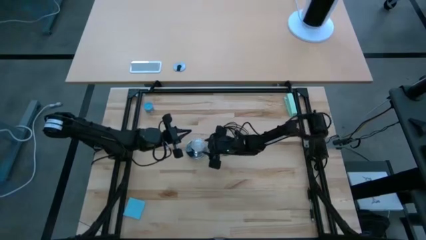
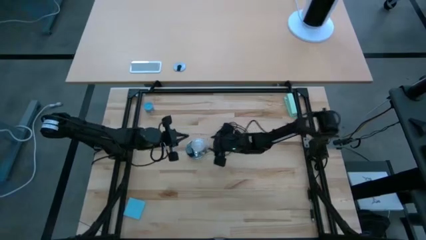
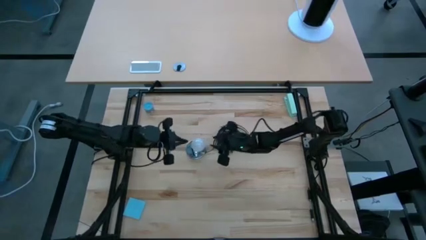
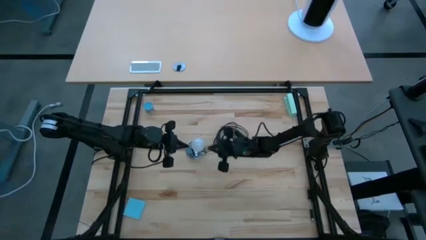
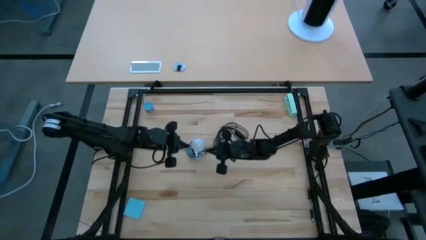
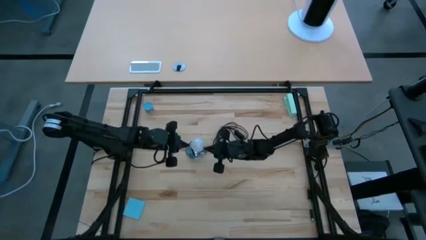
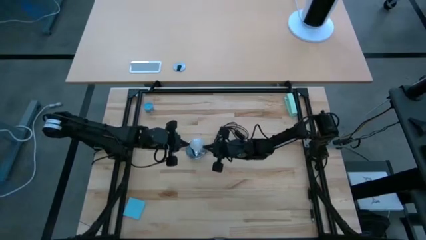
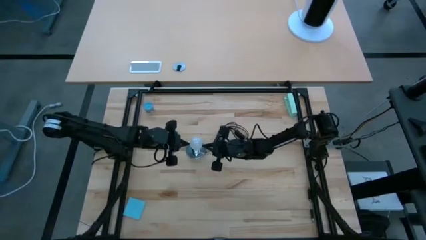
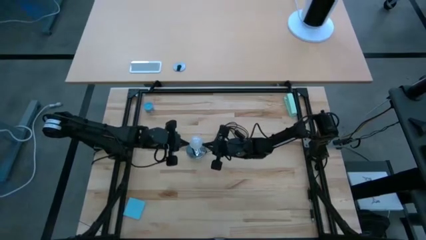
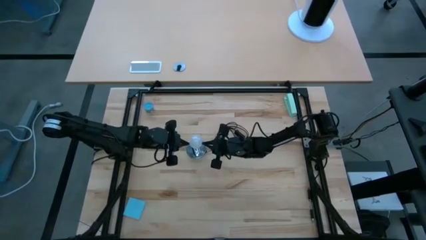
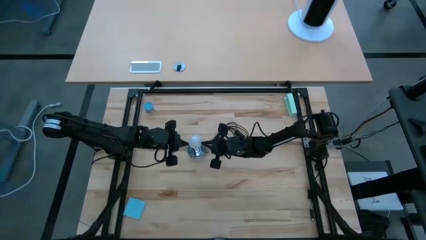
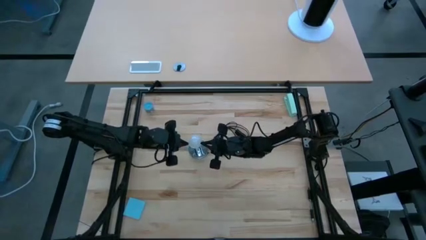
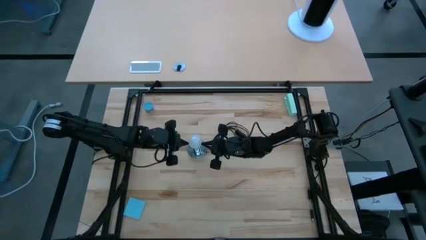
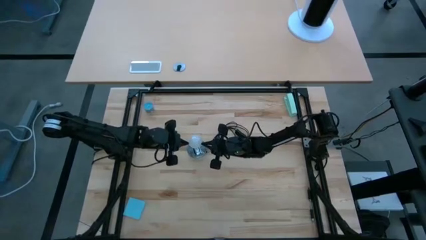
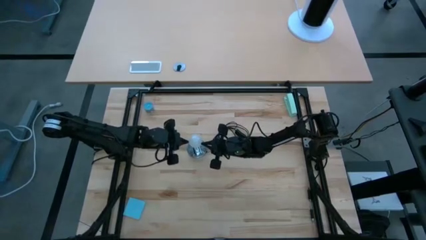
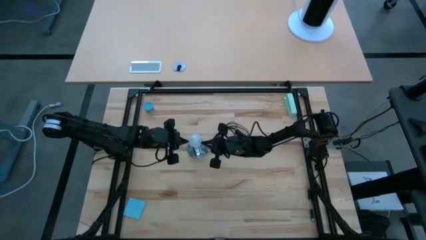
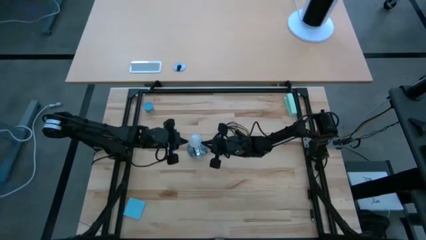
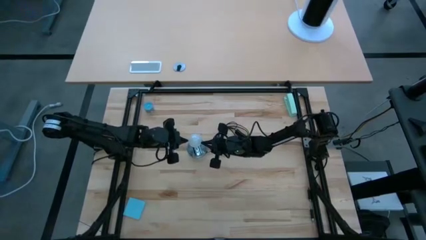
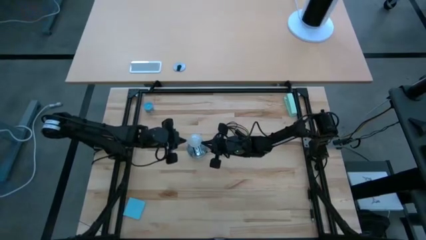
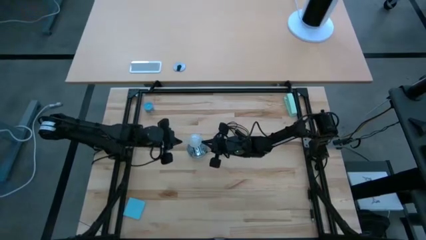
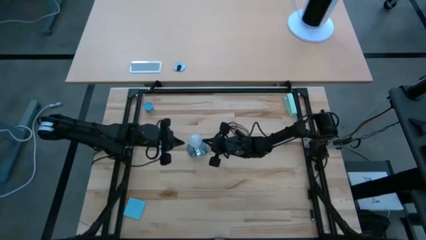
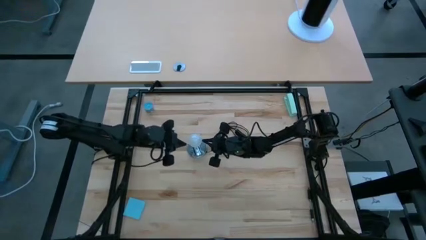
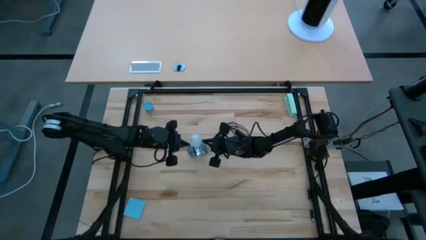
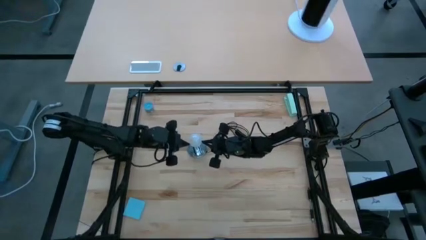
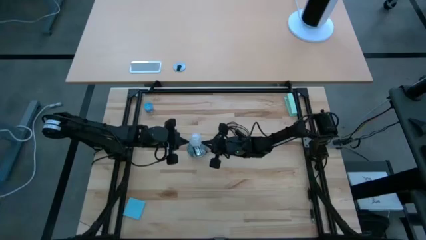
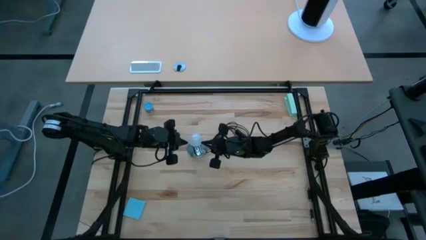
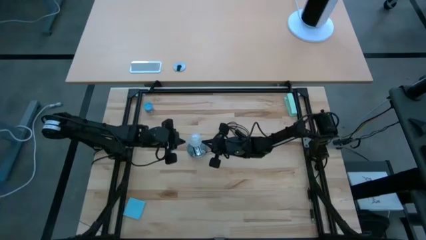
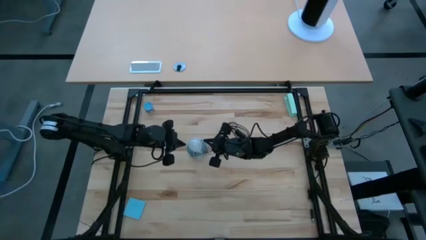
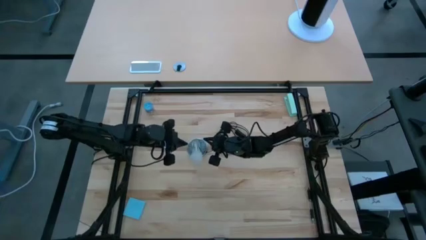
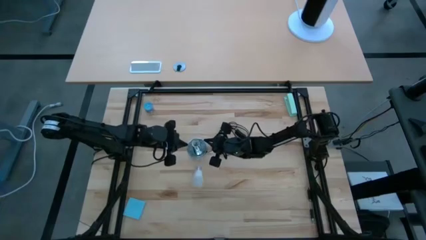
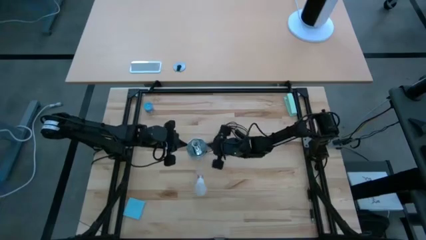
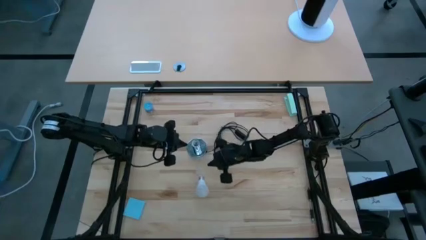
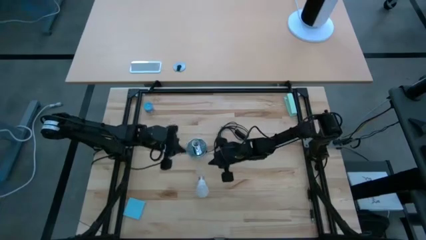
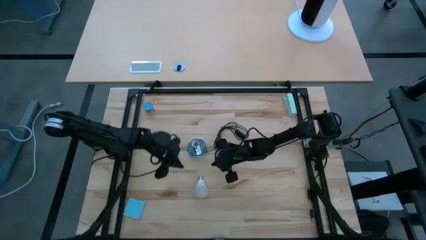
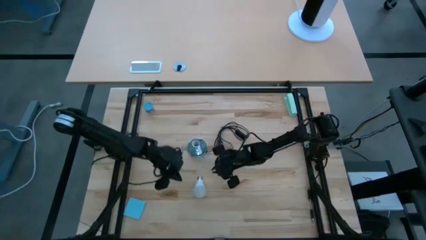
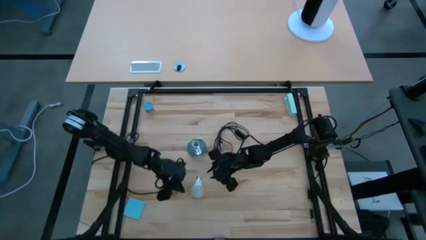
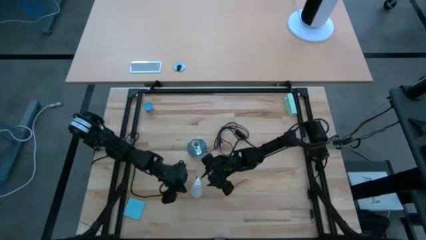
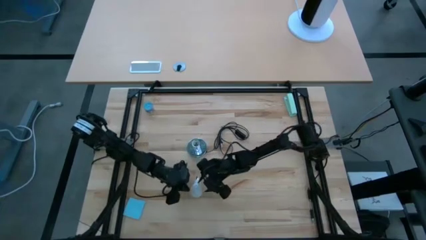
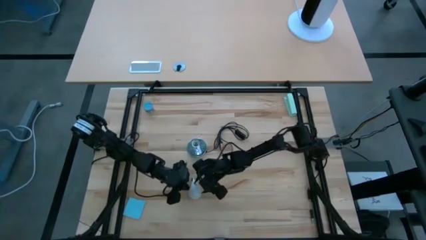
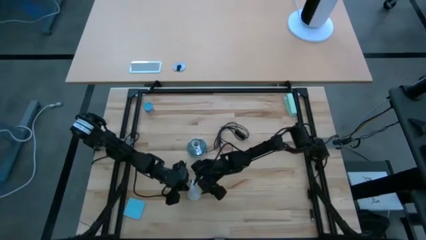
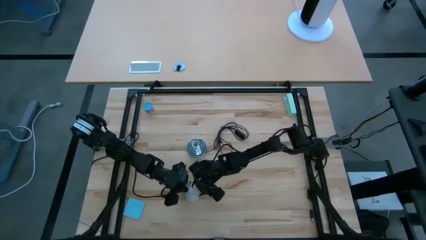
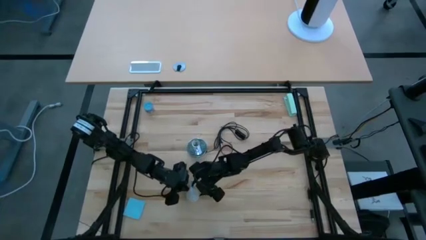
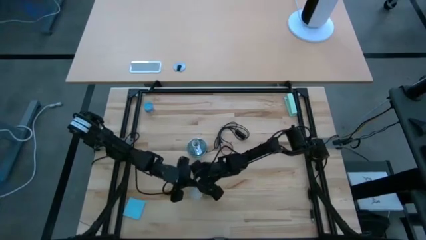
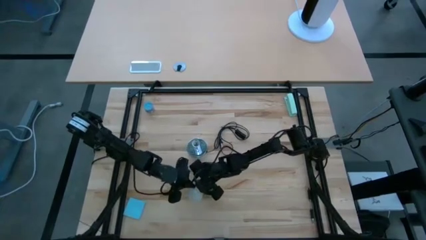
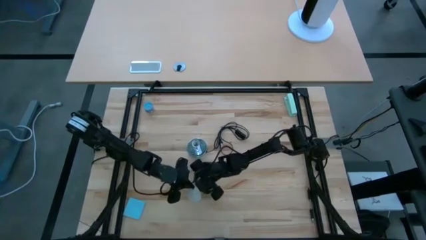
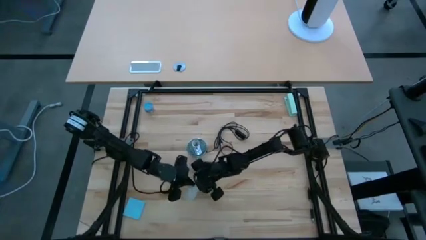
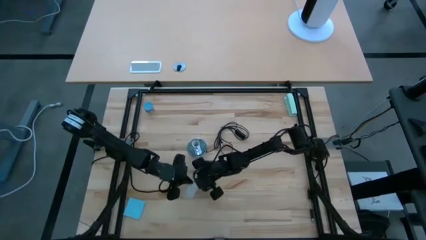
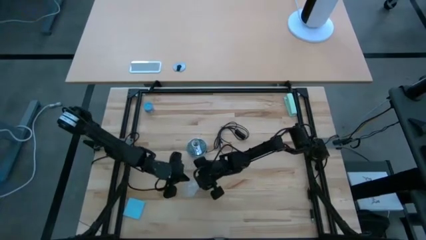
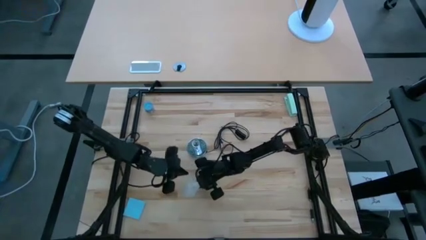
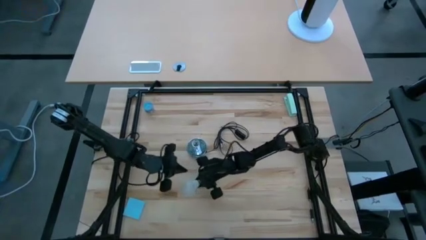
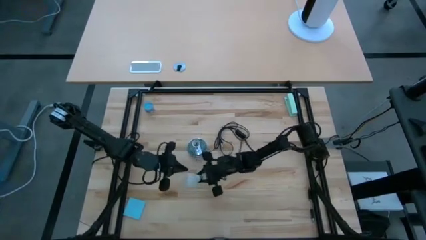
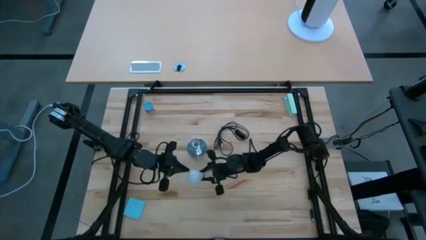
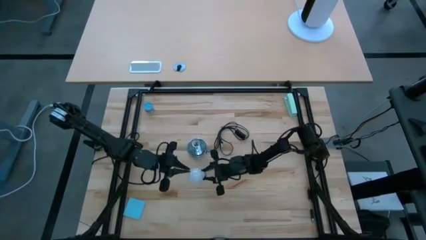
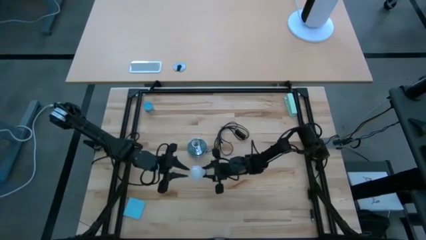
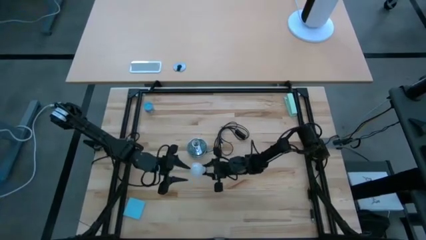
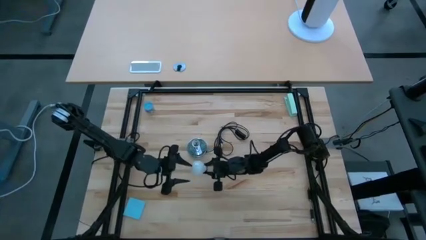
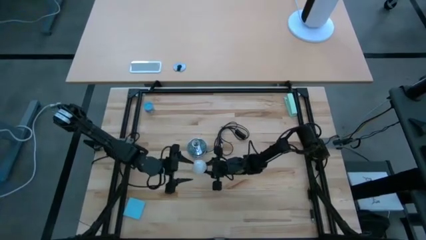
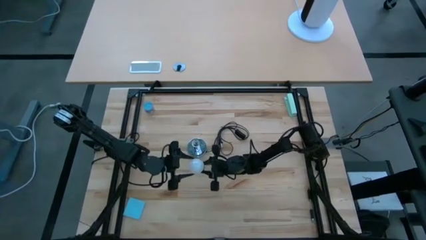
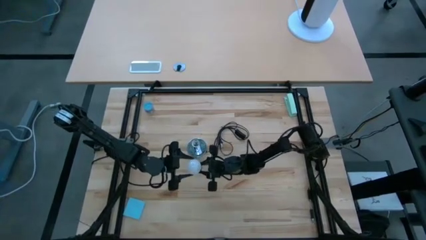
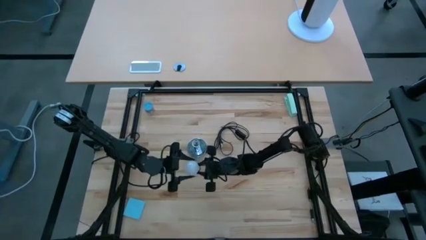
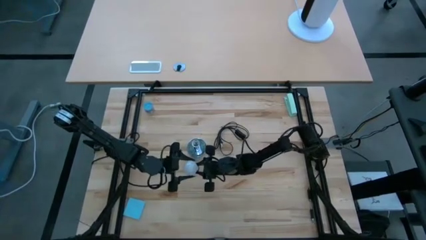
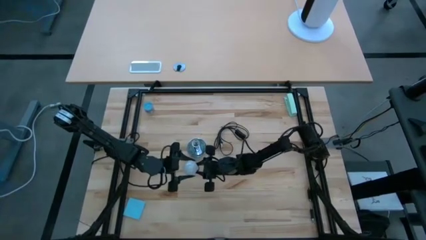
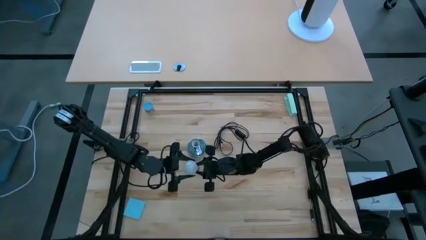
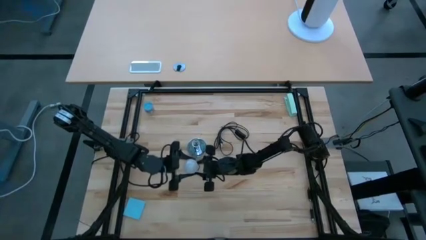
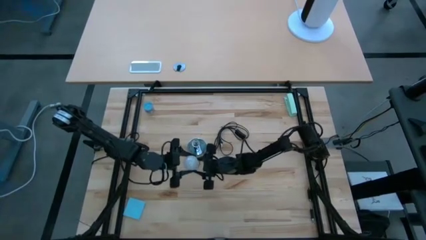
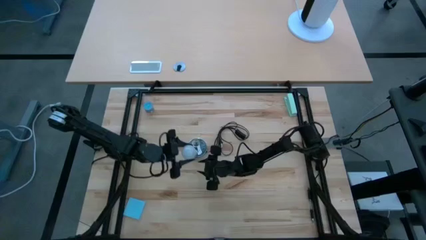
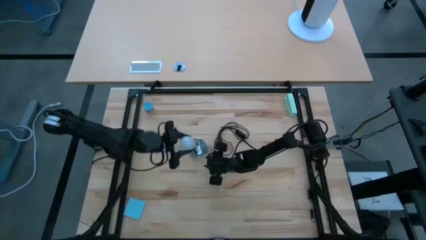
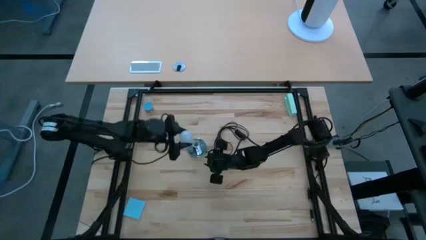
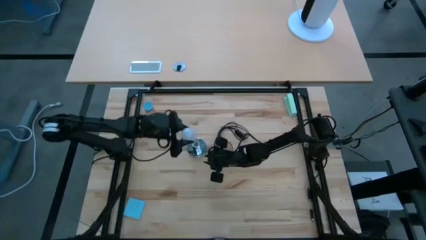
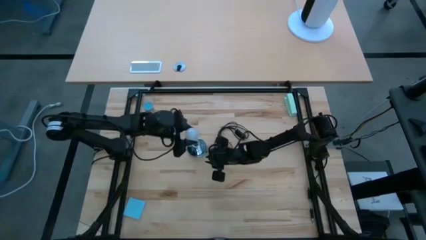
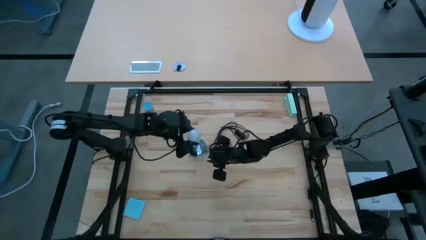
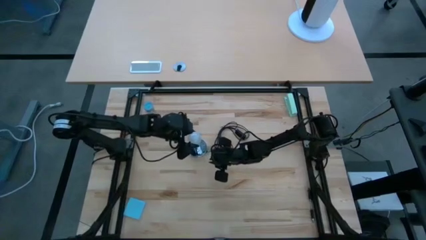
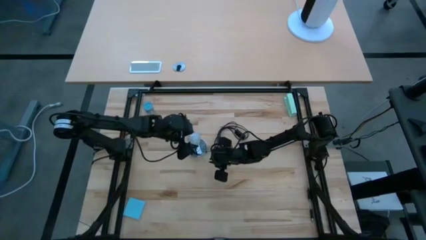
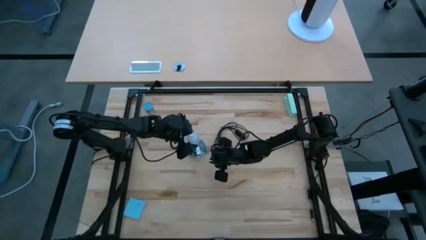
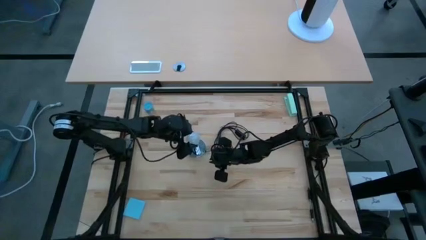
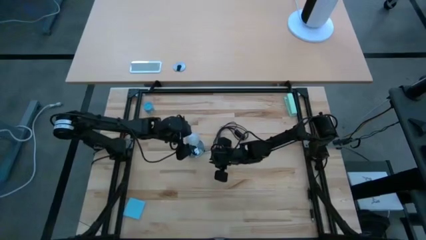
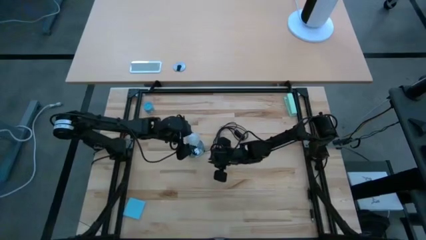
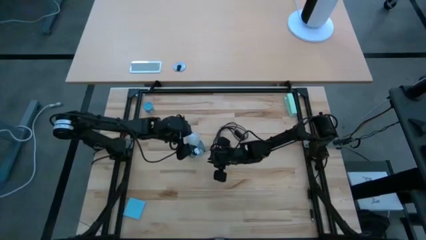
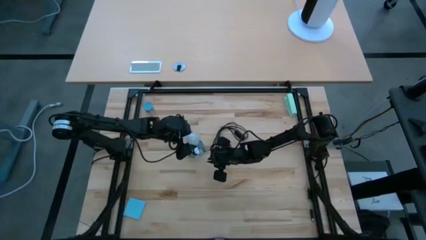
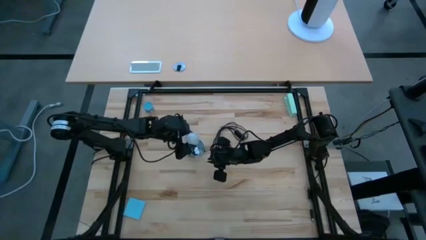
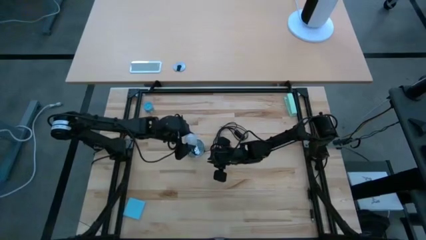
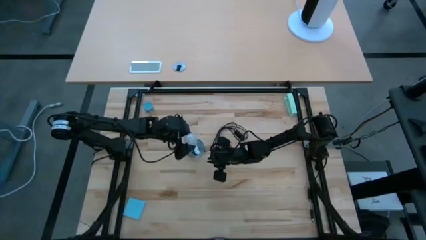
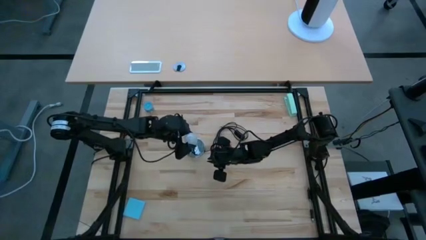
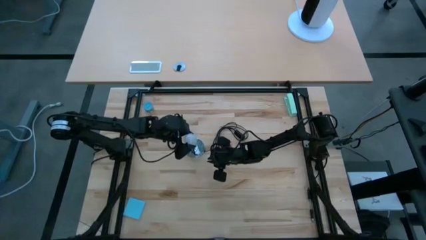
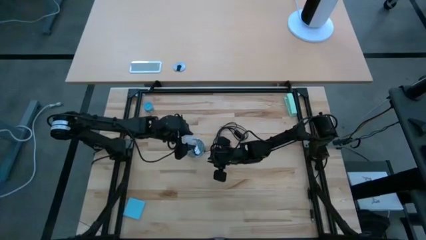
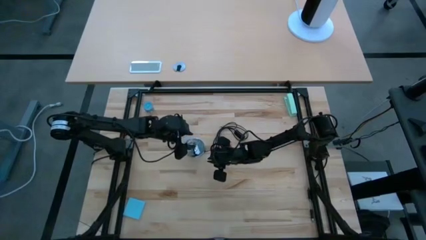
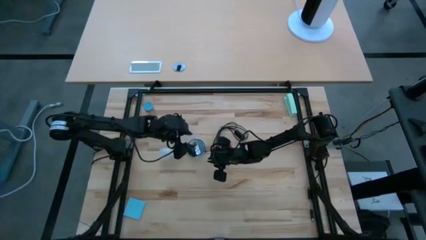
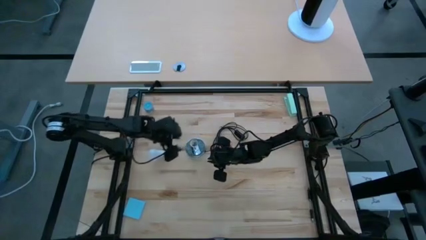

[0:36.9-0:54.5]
Task: Screw lightbulb
Insert the lightbulb into the lamp
